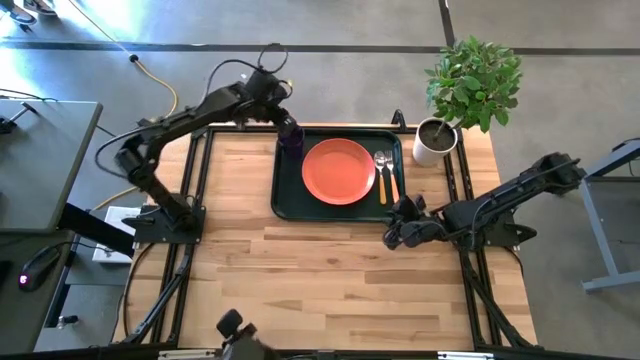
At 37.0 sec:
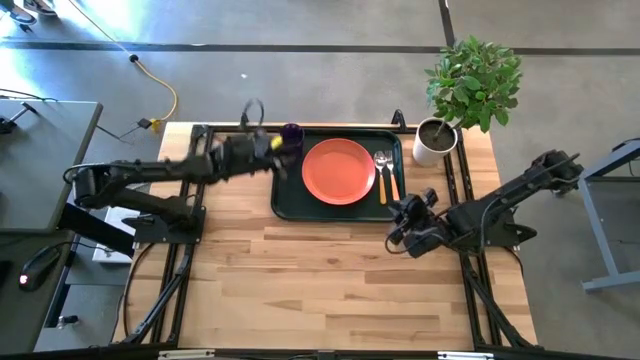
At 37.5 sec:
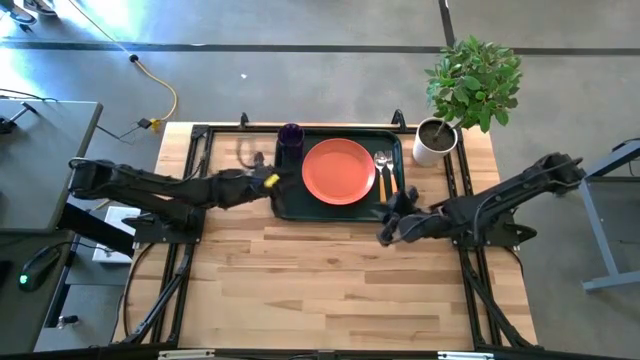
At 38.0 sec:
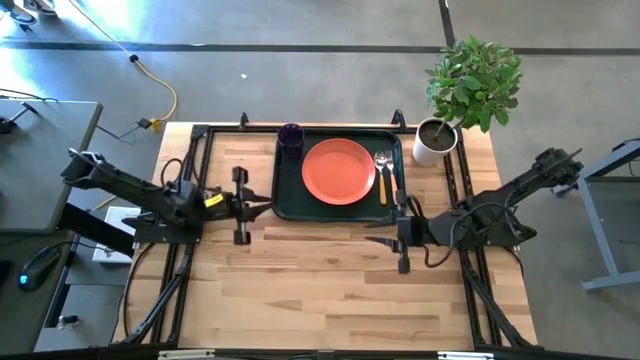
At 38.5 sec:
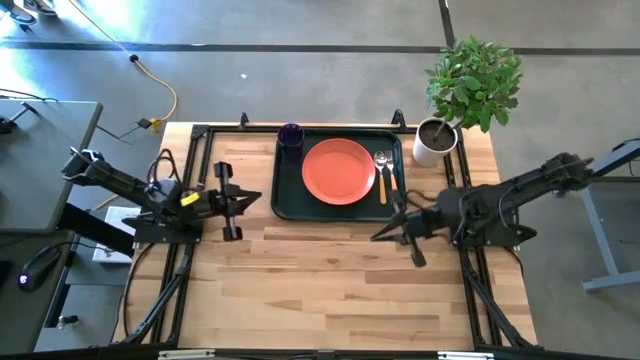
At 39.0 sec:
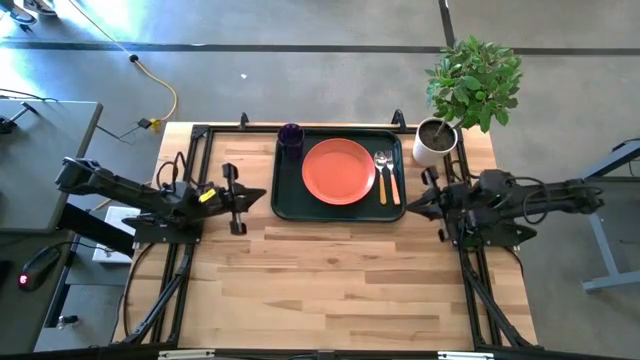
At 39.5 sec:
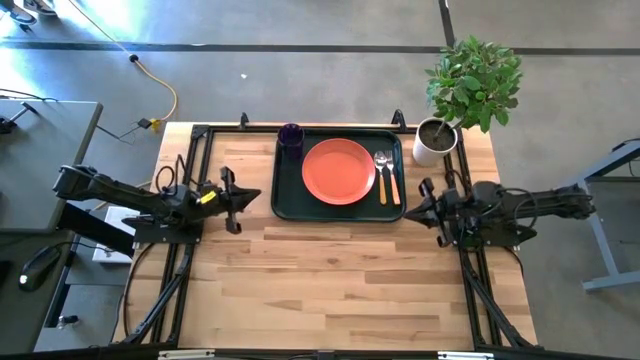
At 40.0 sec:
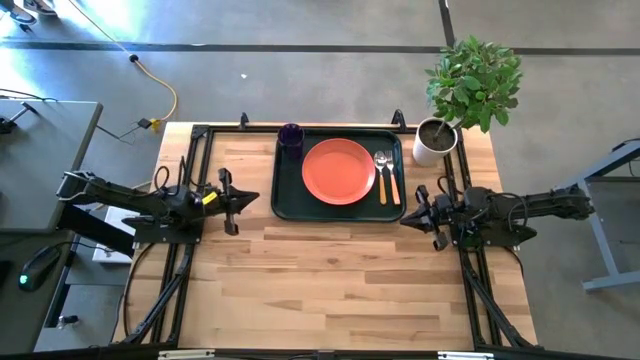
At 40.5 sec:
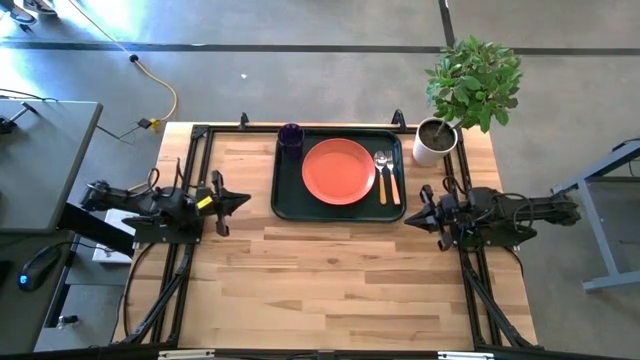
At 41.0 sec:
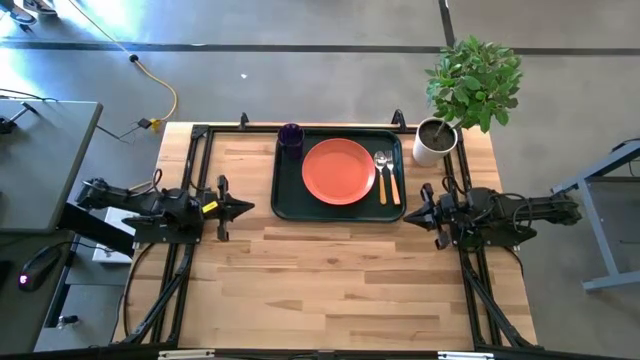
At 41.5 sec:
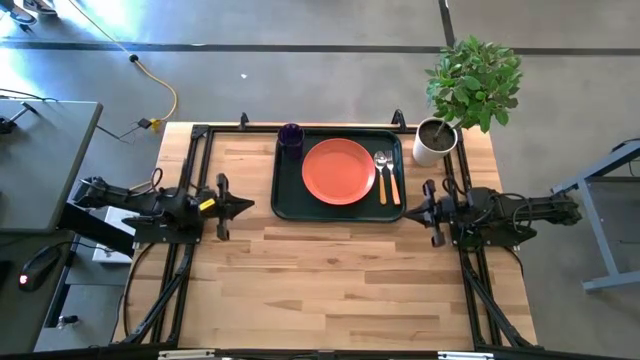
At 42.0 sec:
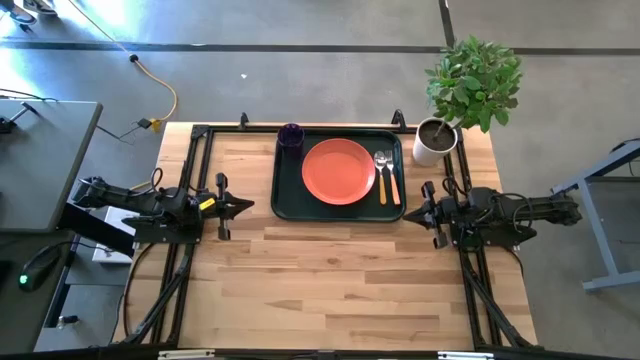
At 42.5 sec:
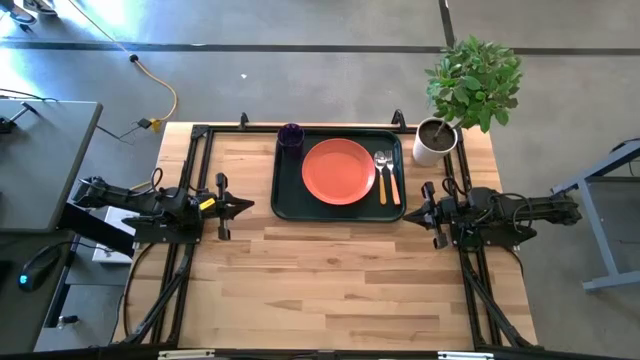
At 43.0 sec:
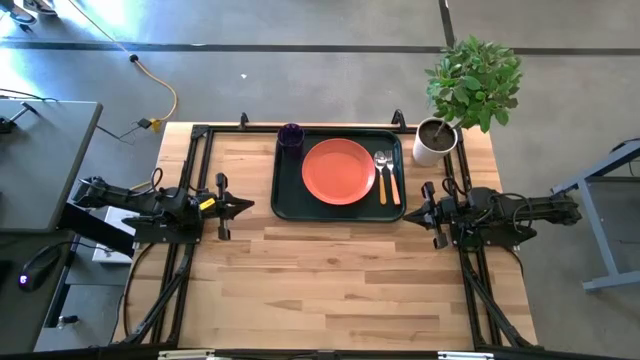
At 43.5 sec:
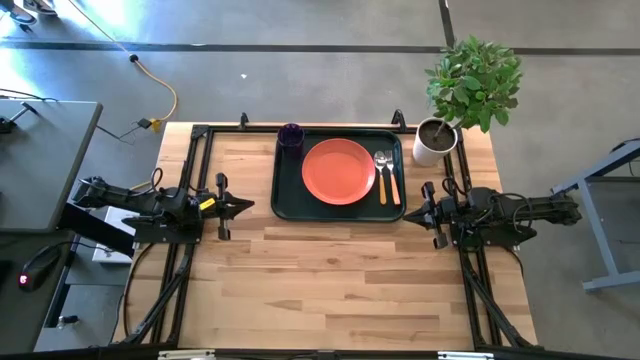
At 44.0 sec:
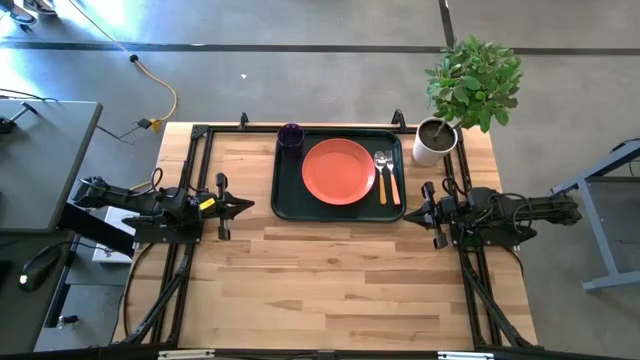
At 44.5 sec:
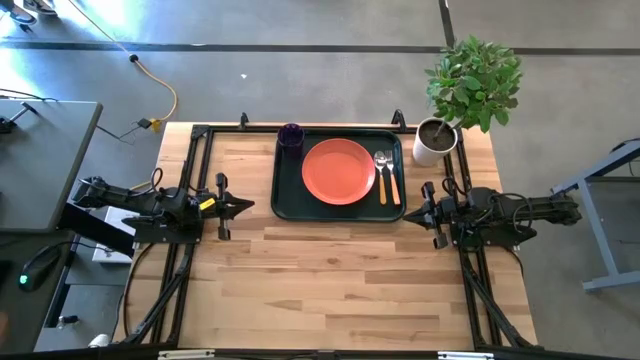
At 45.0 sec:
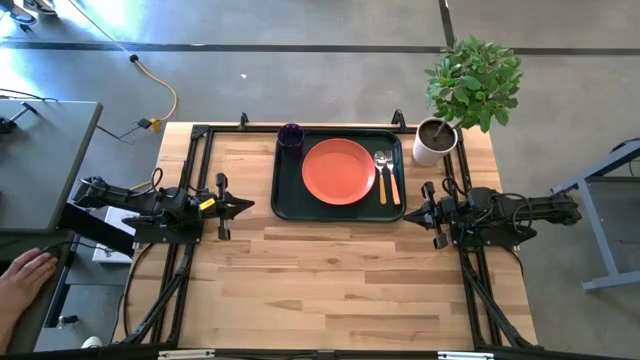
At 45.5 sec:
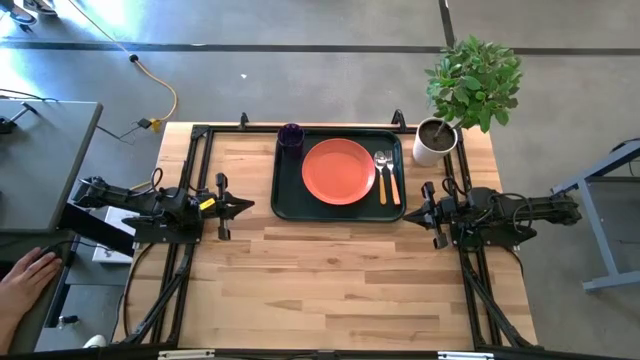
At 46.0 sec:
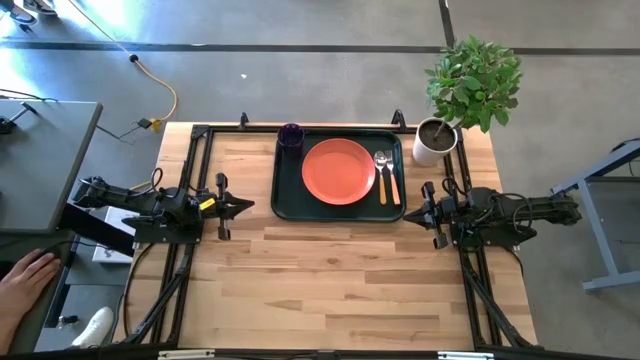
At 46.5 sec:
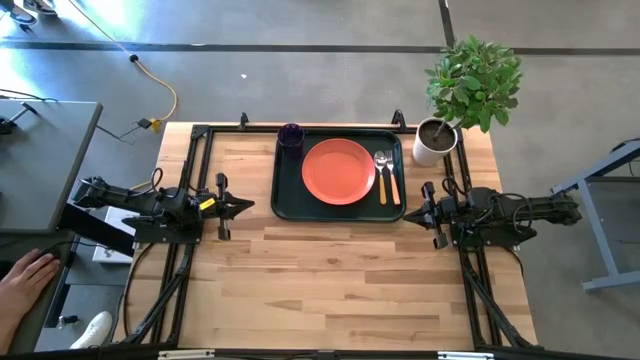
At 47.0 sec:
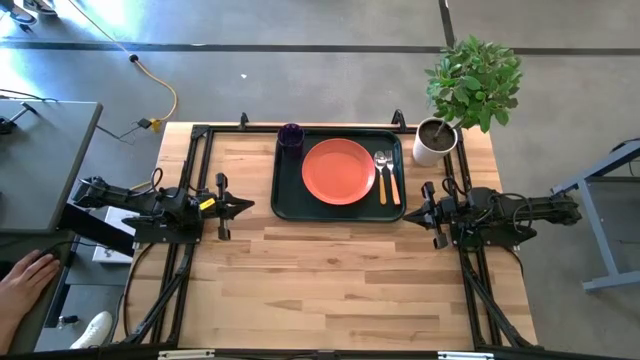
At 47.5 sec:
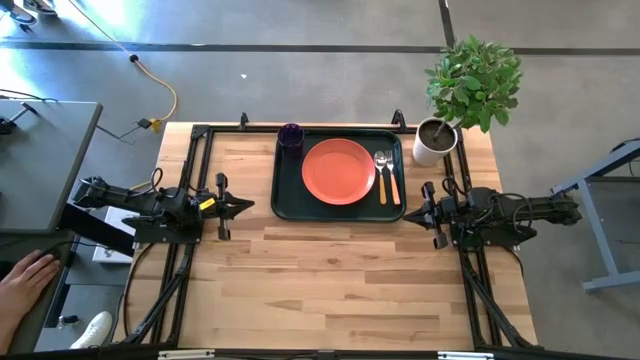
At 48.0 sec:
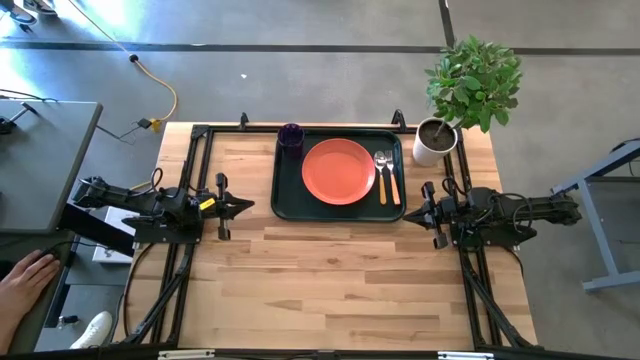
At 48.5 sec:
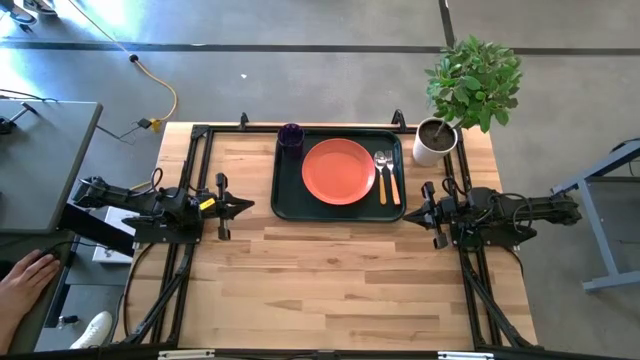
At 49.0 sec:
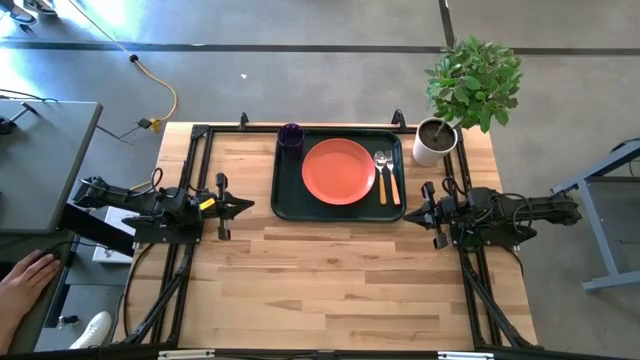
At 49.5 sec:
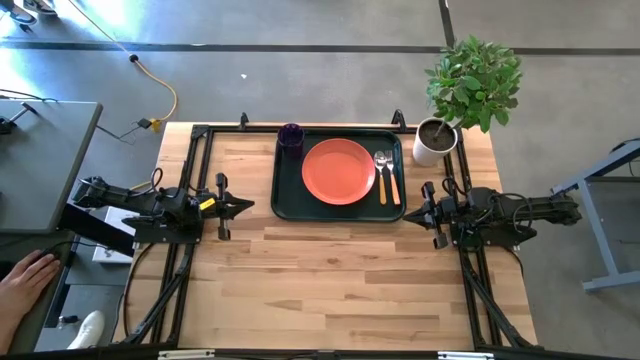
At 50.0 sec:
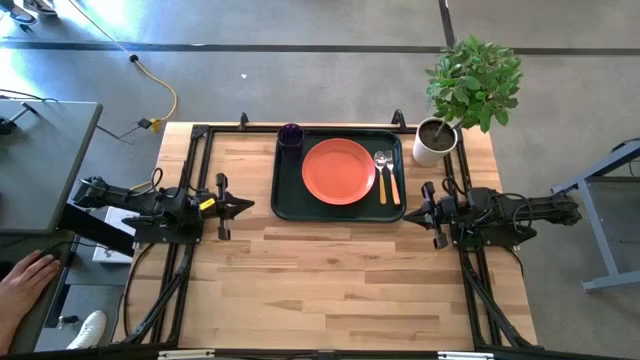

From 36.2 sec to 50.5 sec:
Task: Pick and place plate/cup/fork/spoon on tray
Return to Home Position

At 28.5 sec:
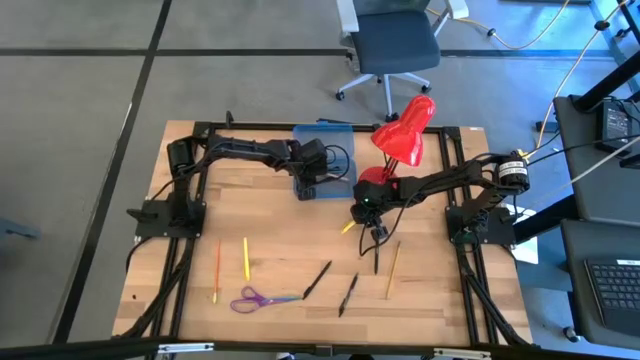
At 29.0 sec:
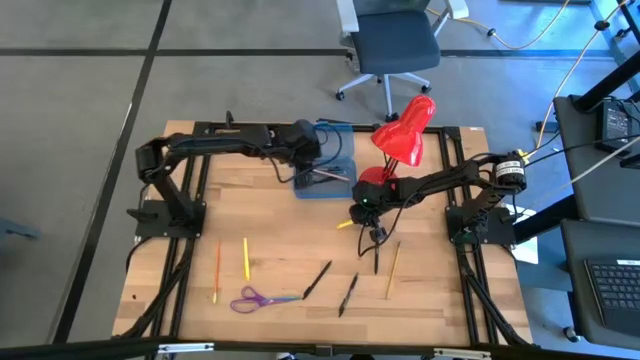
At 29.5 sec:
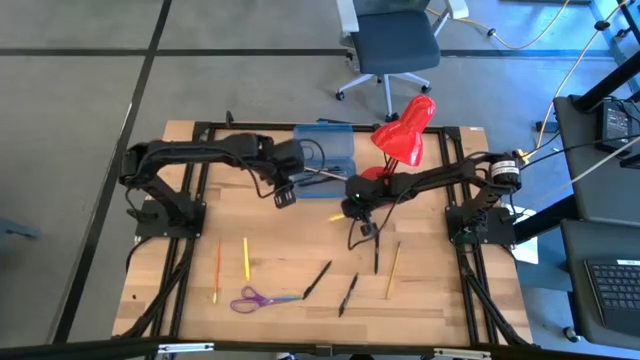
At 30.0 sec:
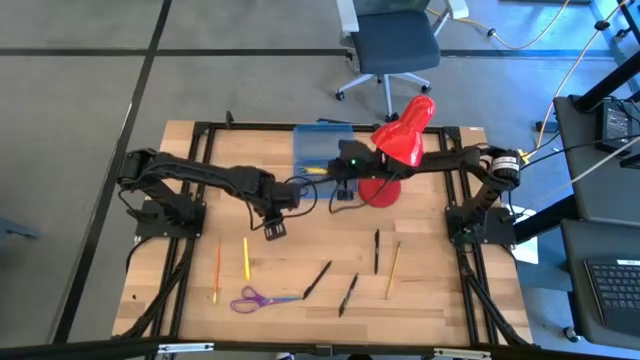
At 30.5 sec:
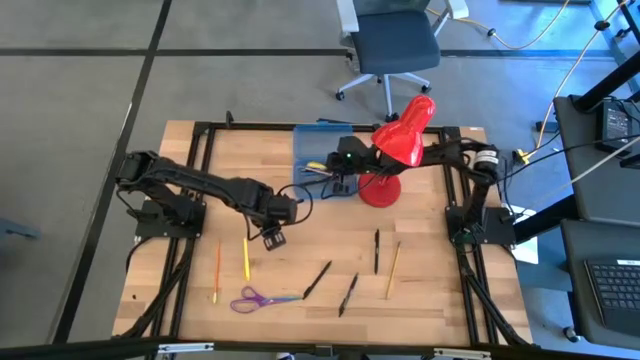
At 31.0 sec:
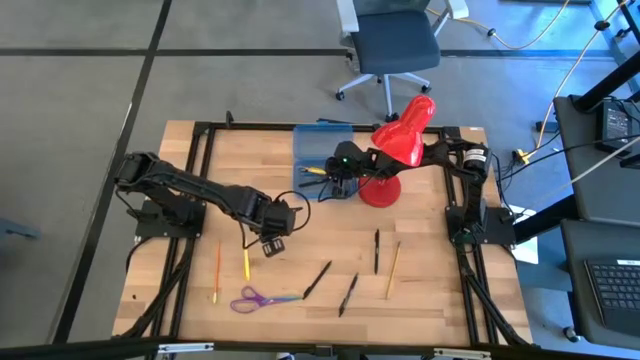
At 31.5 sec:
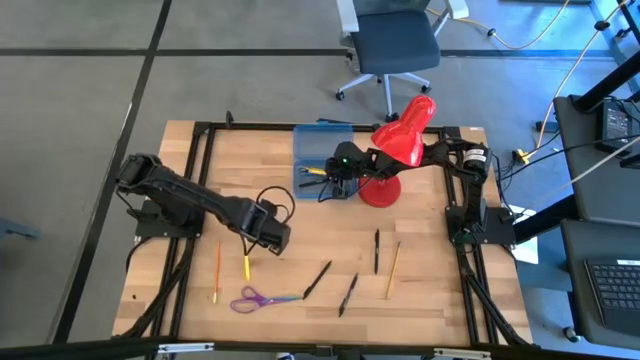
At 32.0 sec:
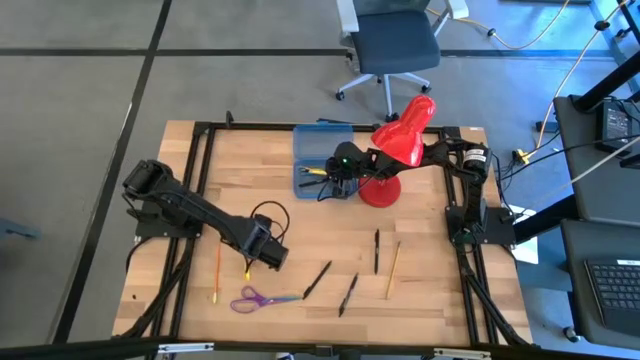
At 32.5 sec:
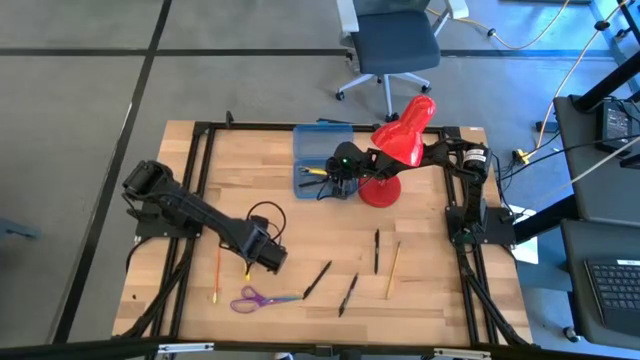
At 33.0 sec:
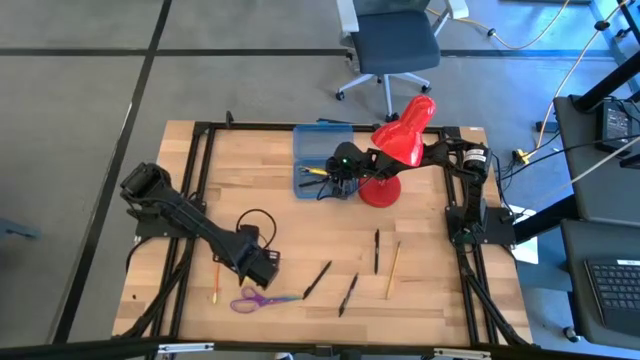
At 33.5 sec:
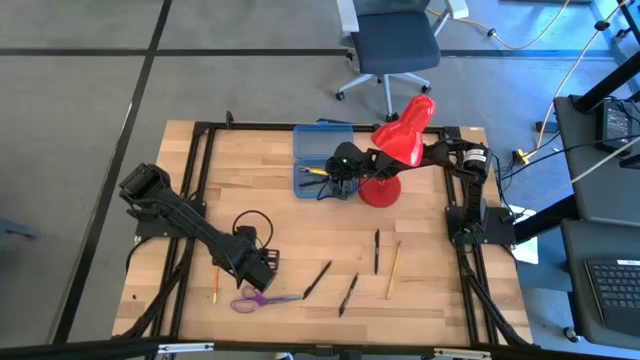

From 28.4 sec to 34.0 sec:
Task: Pick & place school supplies into a supply box
Put the yellow pen into the blue supply box
